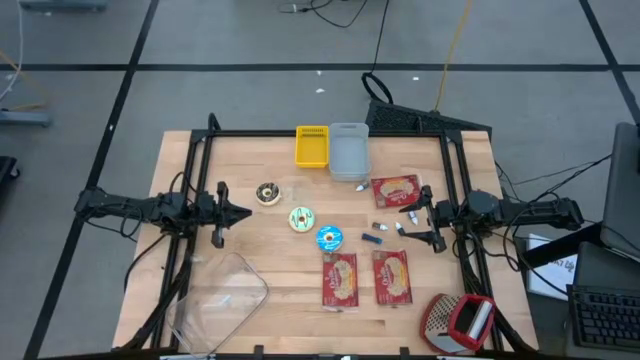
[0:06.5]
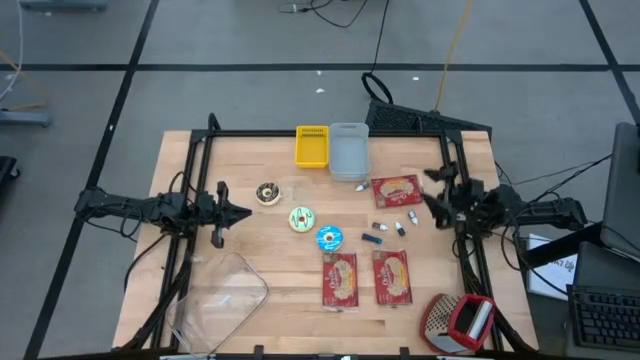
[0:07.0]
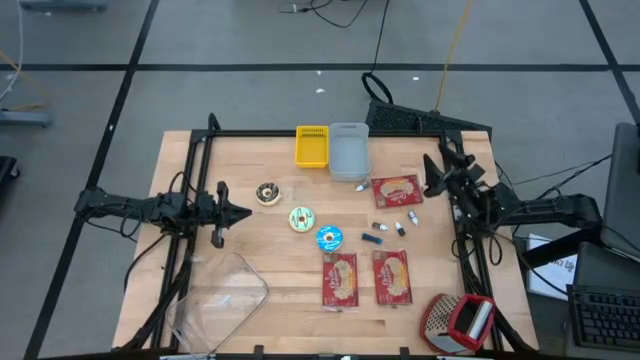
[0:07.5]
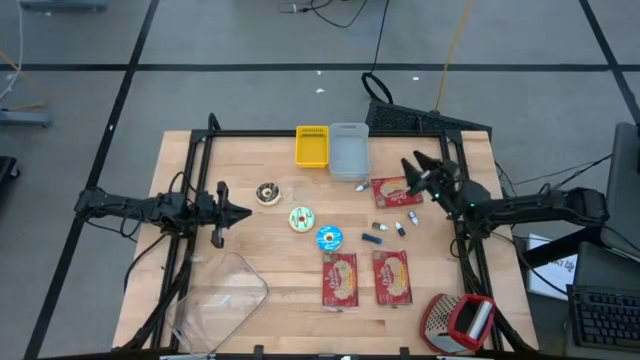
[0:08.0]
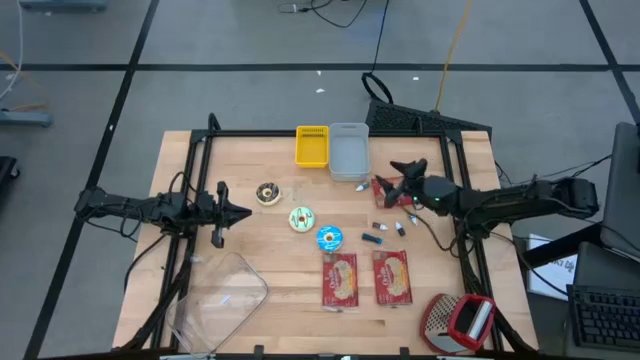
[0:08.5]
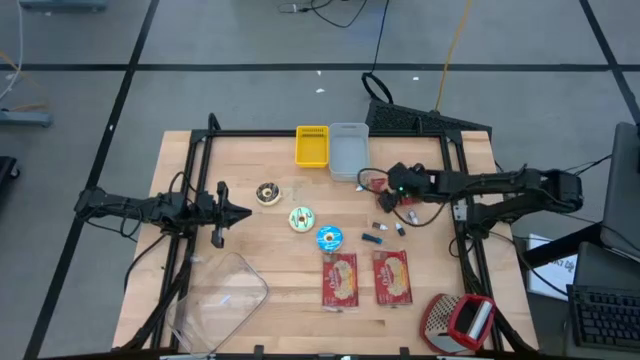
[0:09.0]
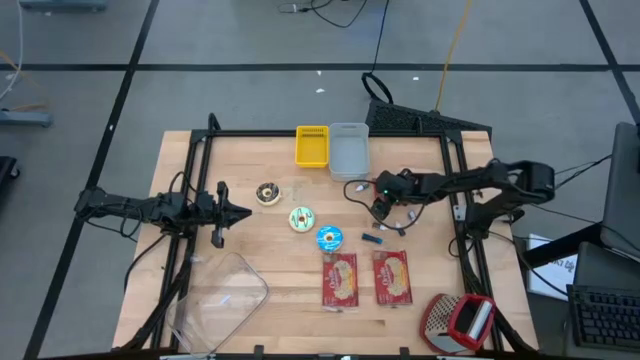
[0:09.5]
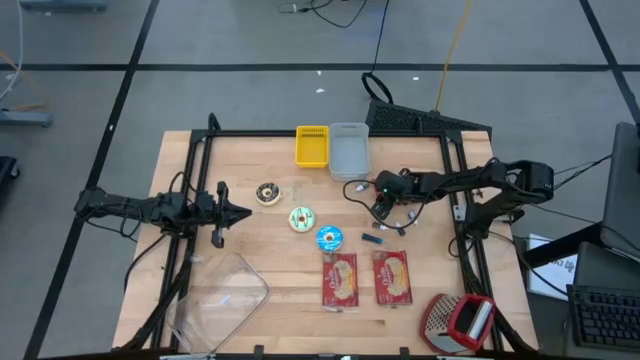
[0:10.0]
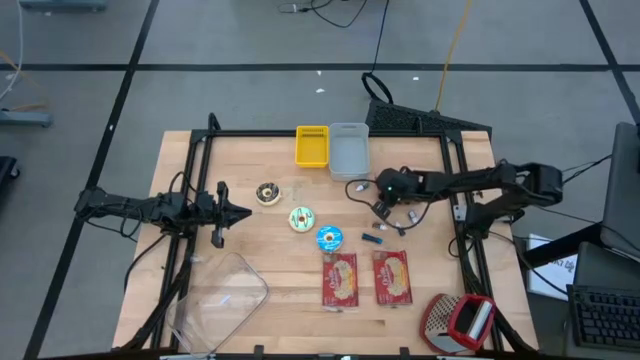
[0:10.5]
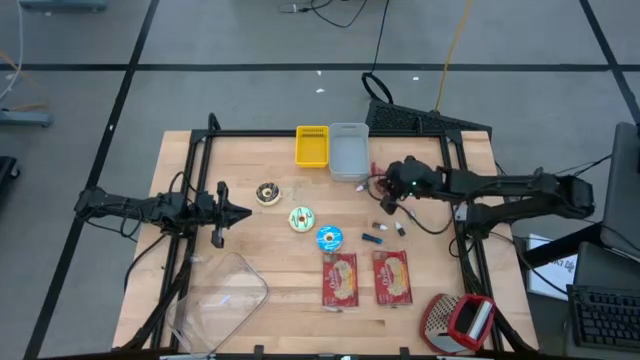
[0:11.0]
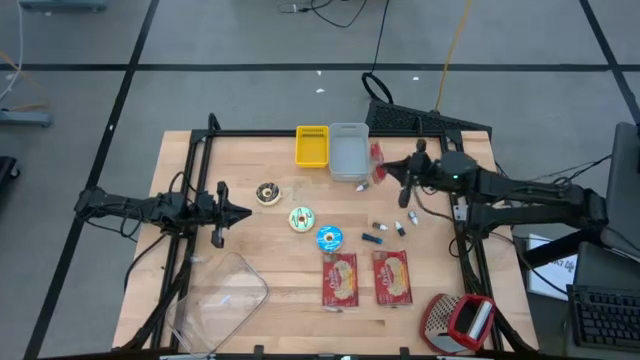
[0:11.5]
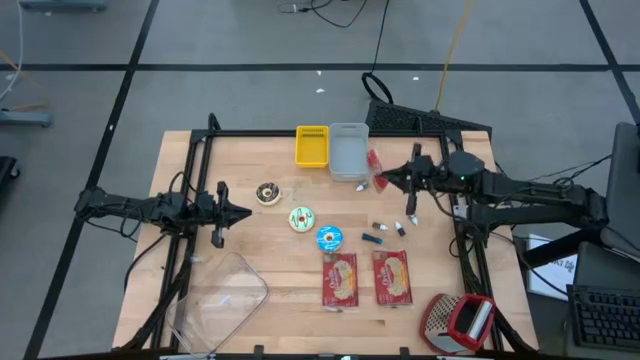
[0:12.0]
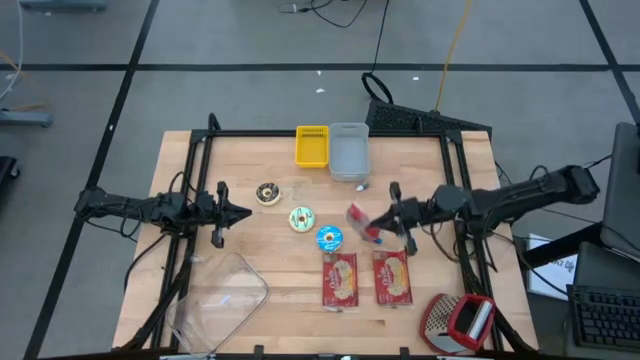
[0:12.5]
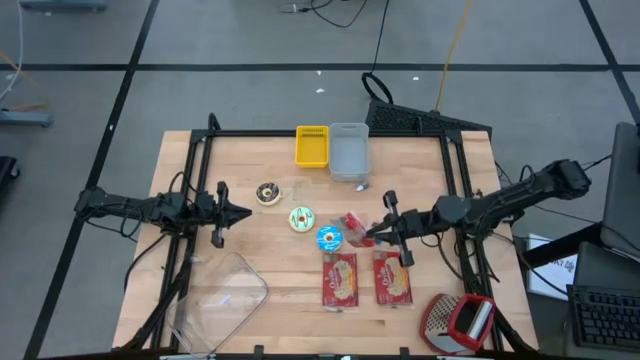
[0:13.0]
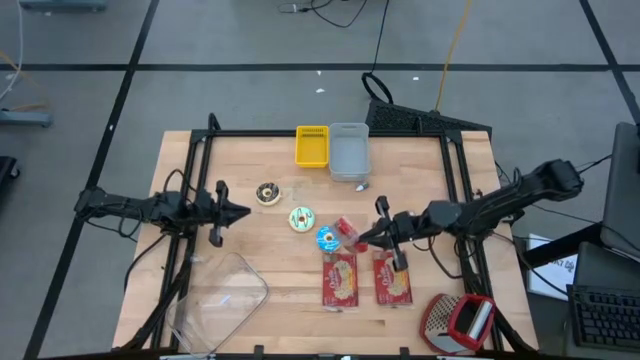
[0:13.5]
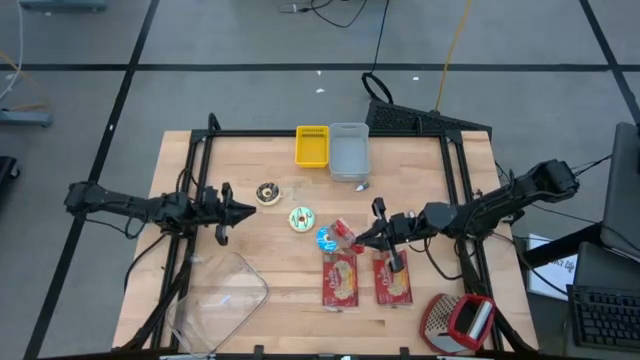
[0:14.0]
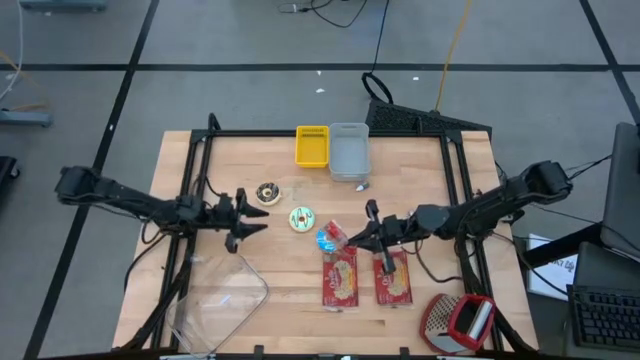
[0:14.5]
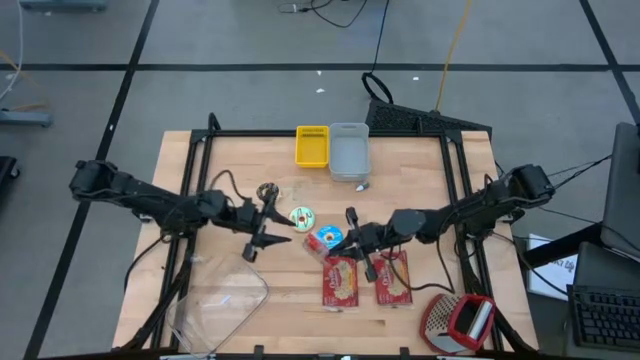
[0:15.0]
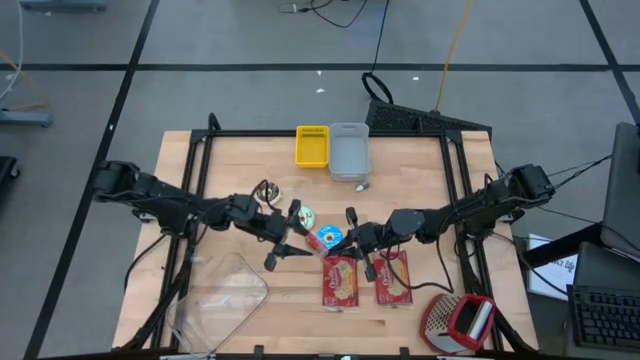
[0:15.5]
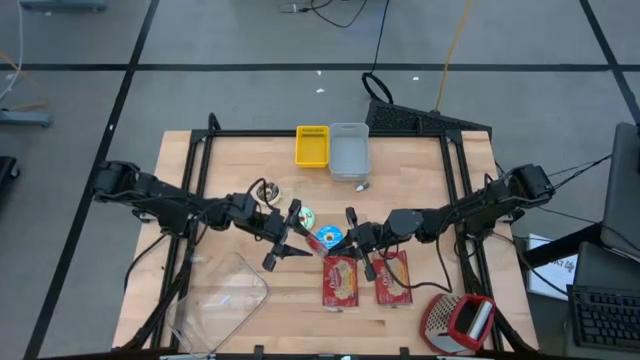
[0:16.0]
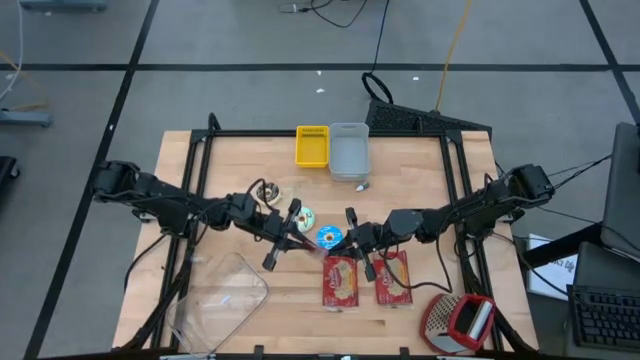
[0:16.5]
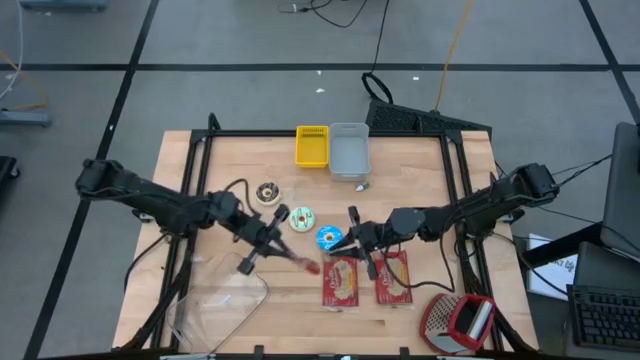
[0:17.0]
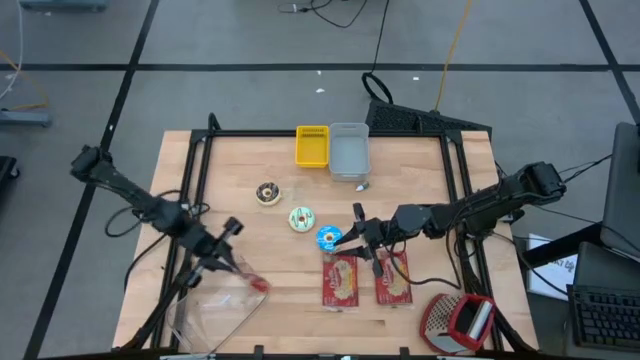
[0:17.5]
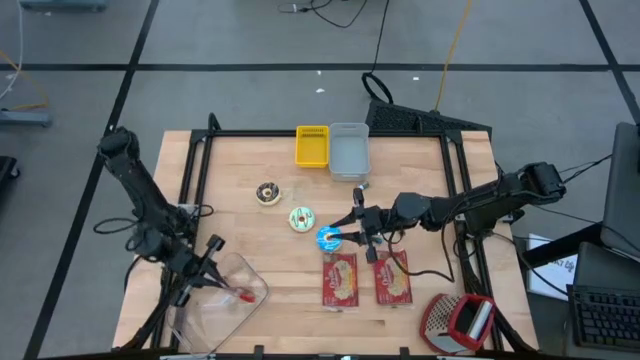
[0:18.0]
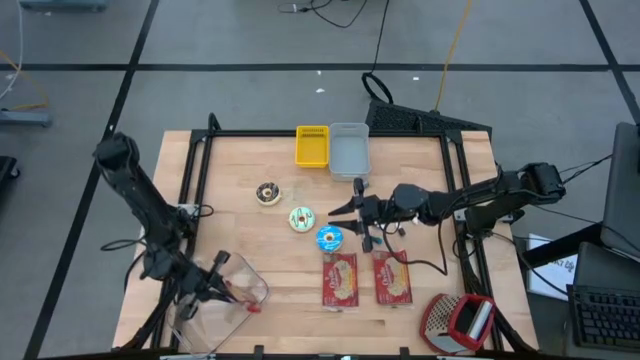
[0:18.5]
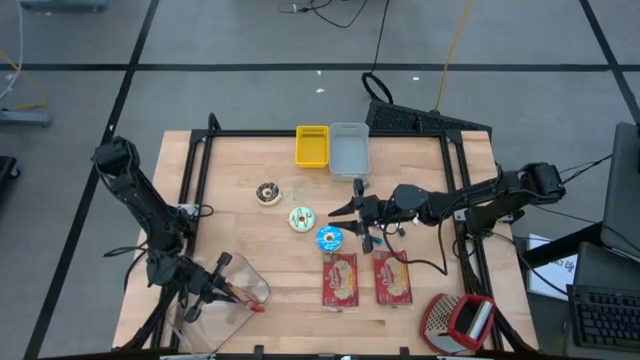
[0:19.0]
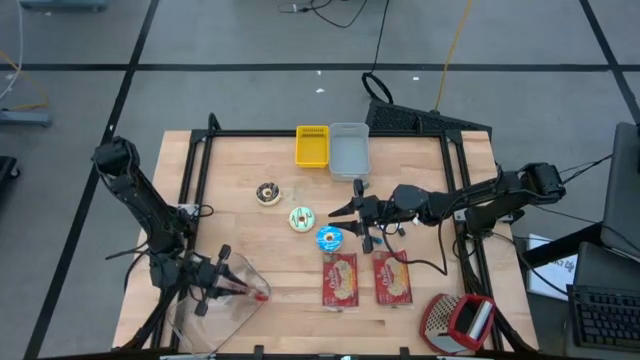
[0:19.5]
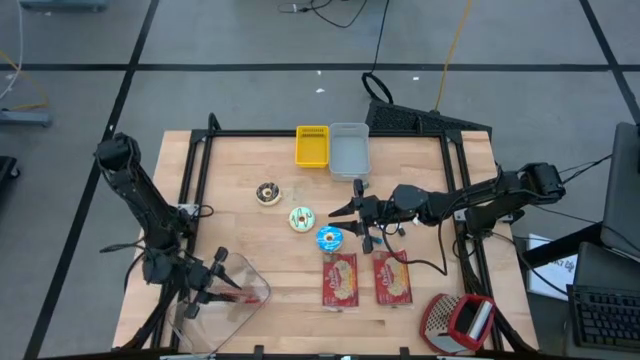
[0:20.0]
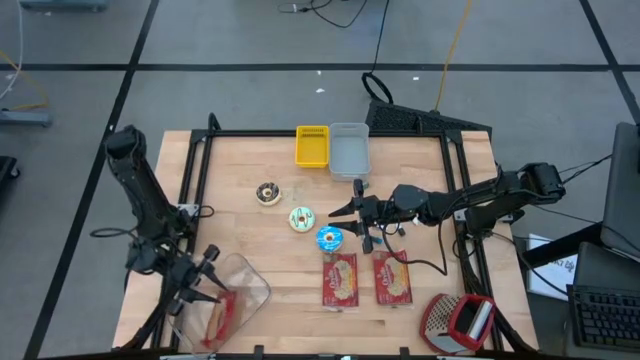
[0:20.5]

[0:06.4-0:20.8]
Put the top right red popcorn bag into the transparent bin
